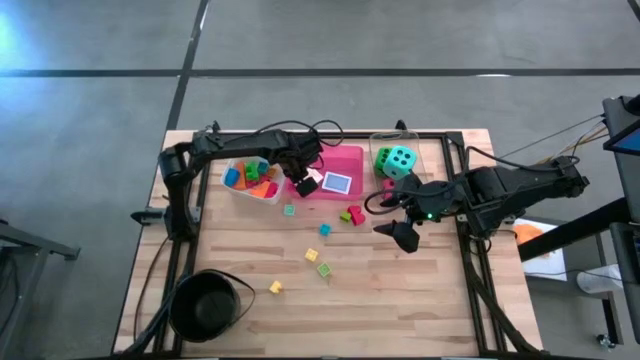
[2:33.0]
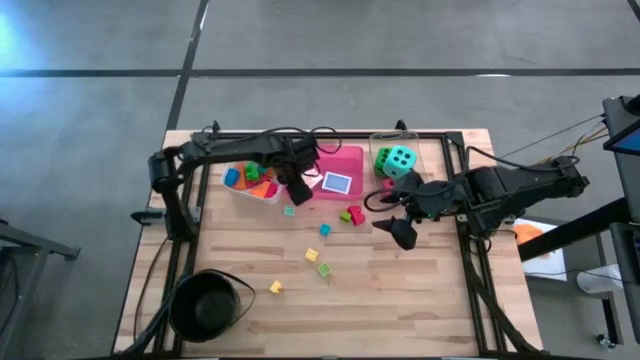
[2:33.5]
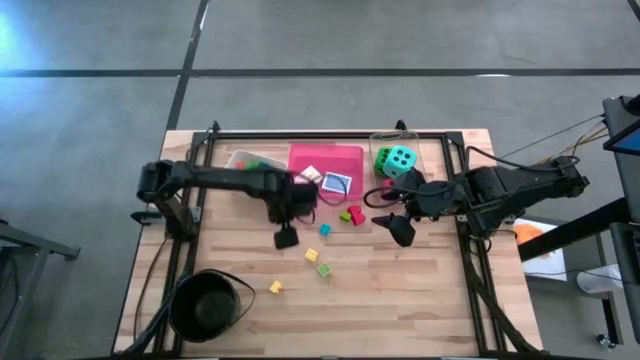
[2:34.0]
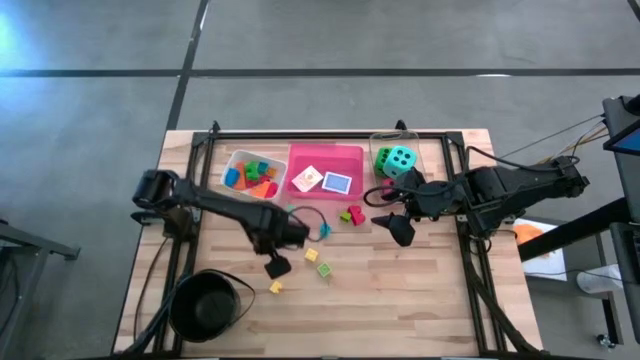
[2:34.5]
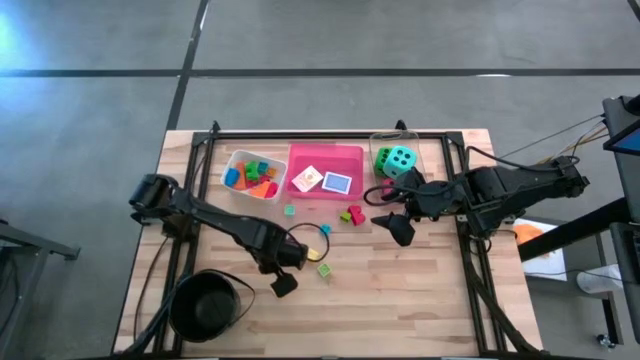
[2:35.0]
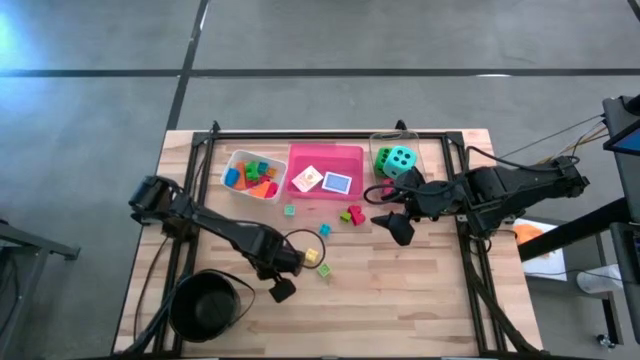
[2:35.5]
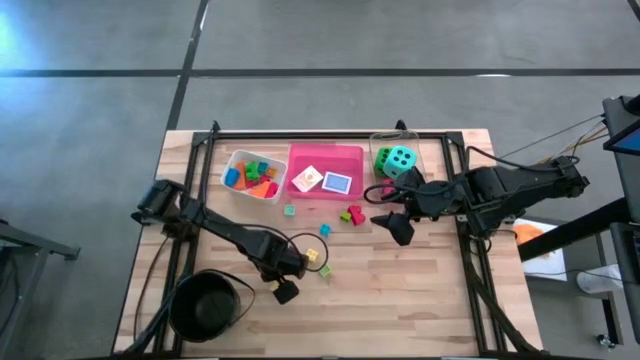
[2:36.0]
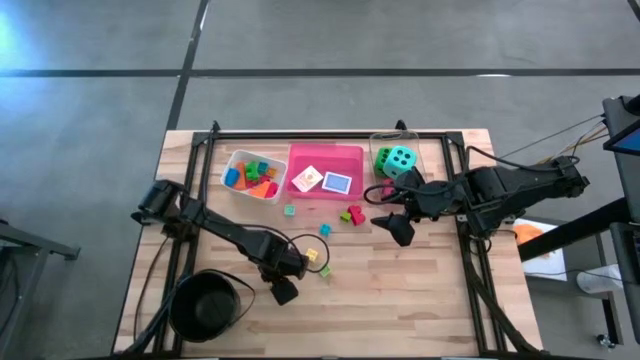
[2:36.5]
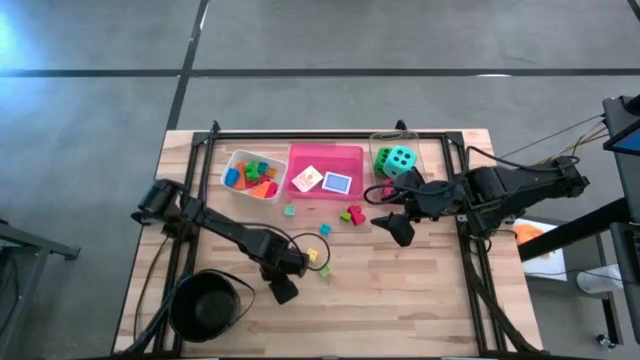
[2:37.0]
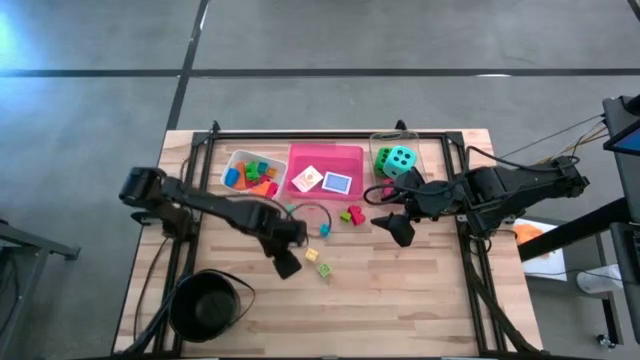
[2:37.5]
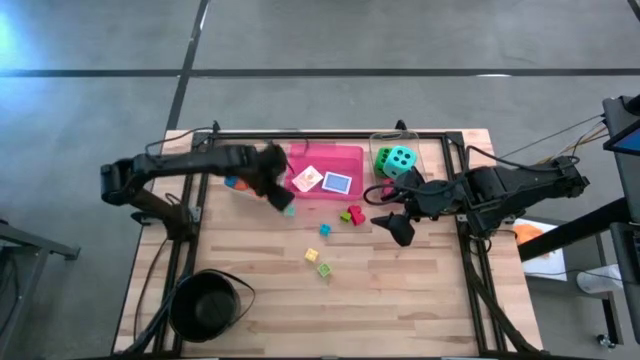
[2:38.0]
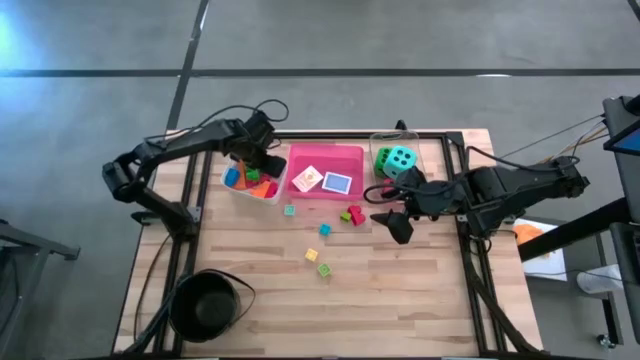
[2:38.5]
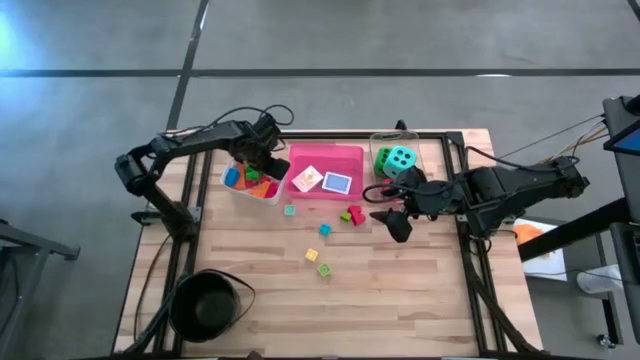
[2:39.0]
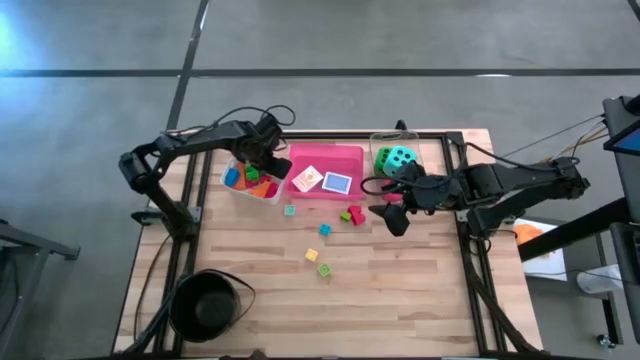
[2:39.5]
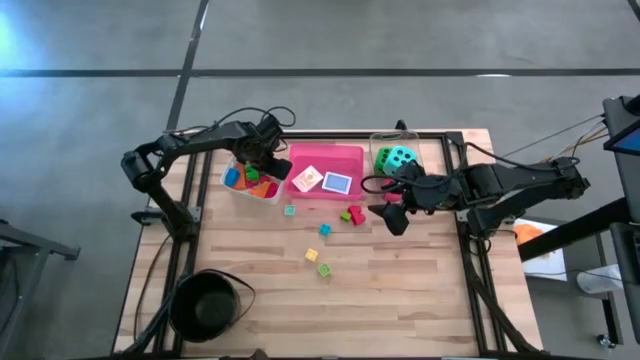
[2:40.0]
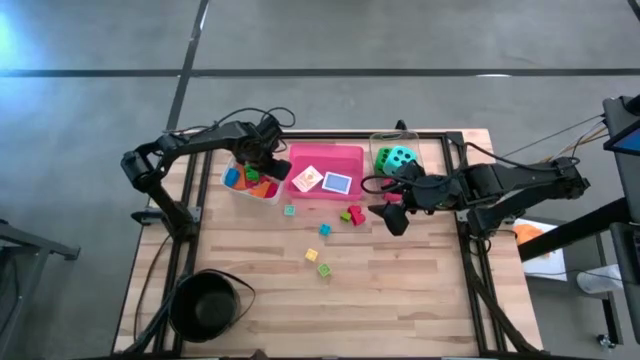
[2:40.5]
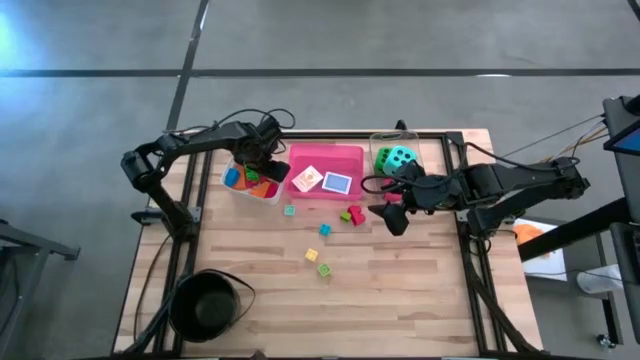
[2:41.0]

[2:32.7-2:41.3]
Task: Pick & Place Toys
Put the light yellow game piece into the white bin

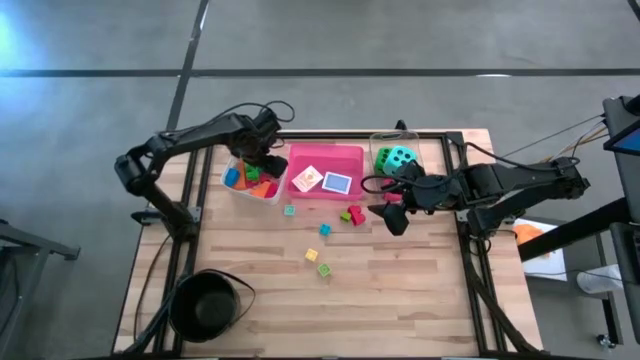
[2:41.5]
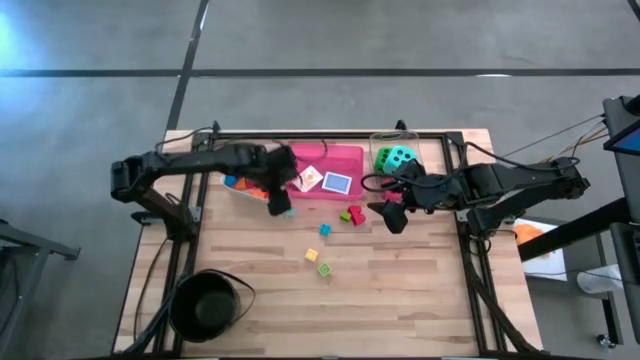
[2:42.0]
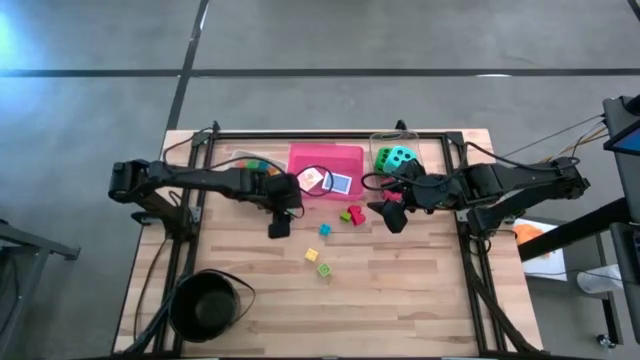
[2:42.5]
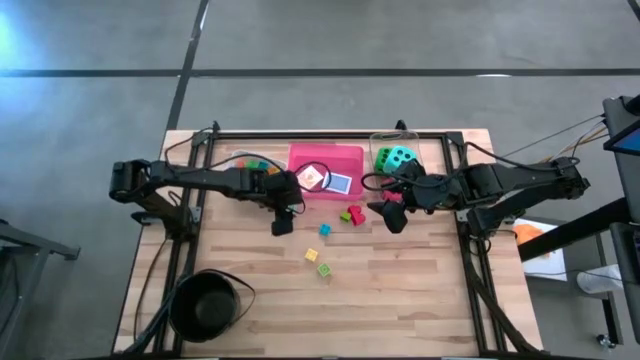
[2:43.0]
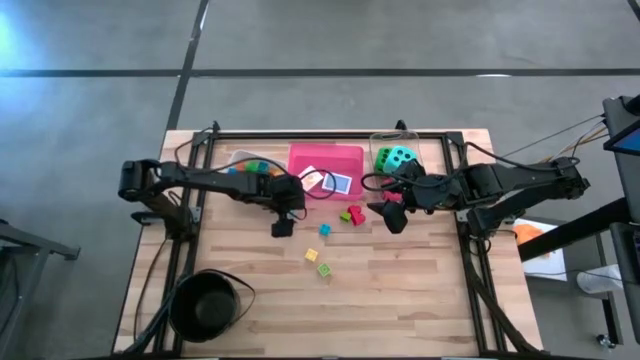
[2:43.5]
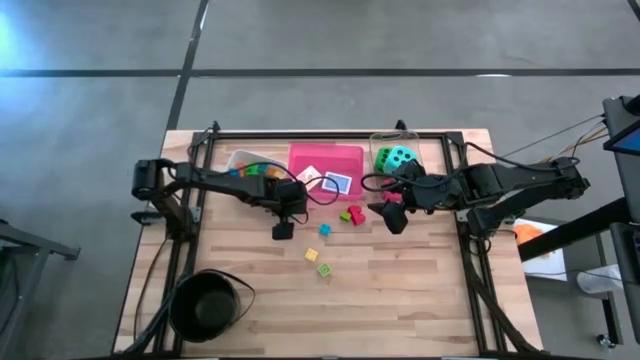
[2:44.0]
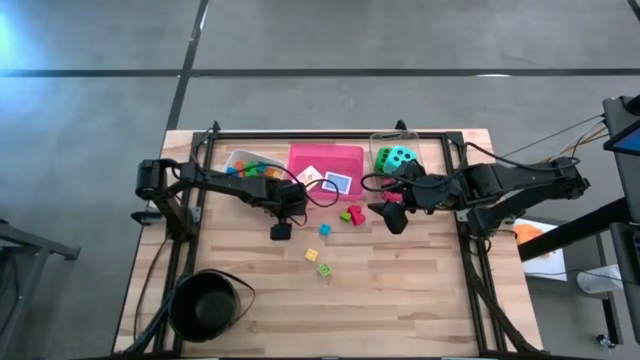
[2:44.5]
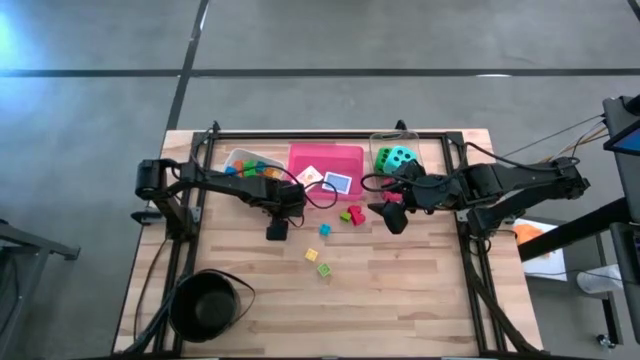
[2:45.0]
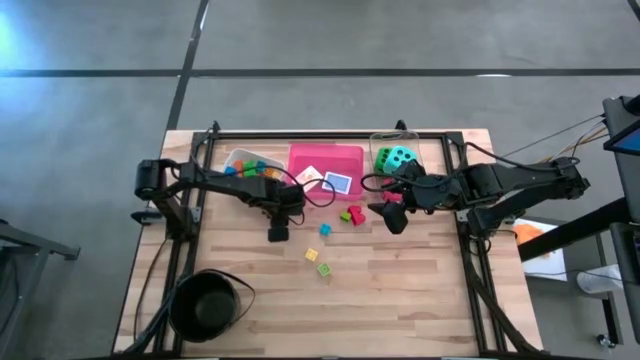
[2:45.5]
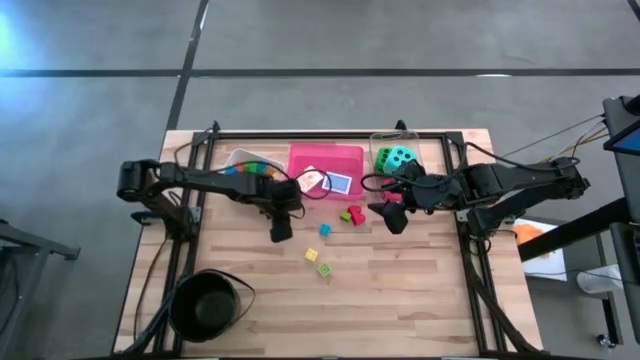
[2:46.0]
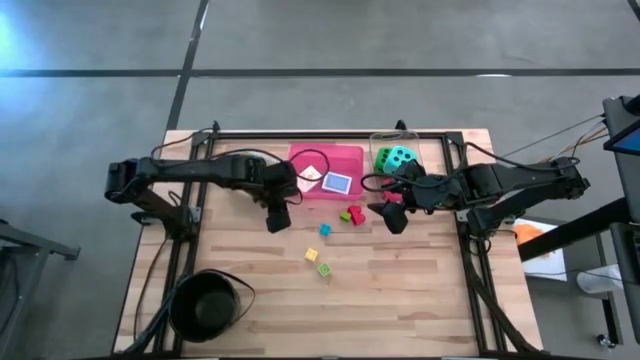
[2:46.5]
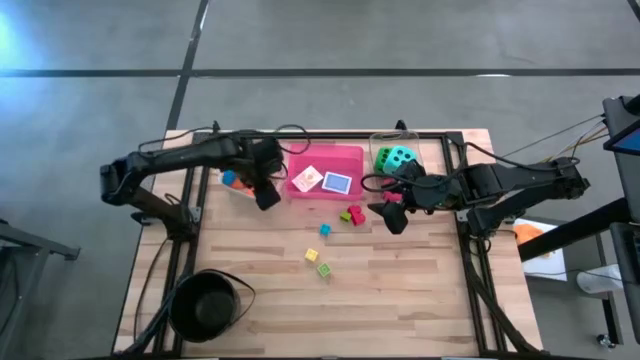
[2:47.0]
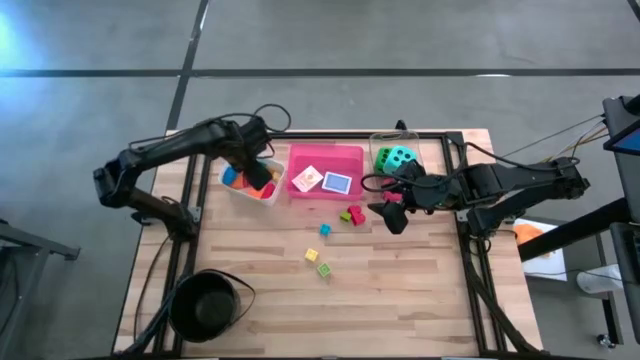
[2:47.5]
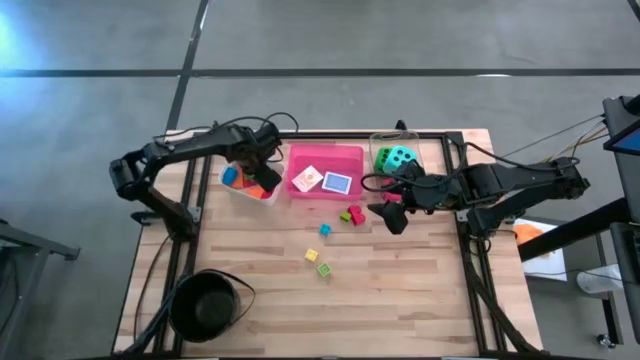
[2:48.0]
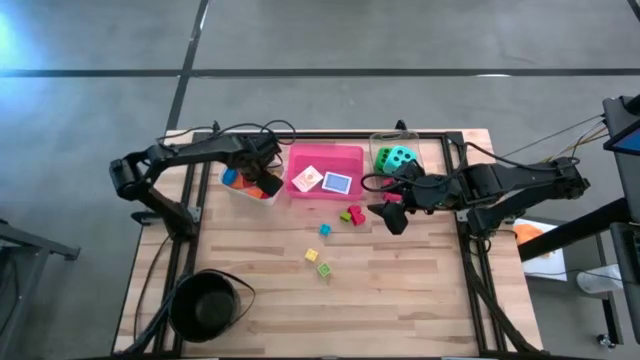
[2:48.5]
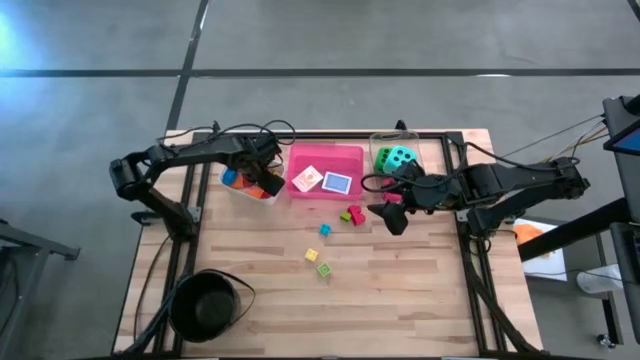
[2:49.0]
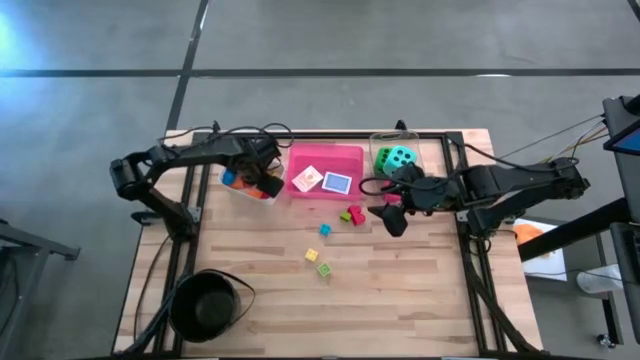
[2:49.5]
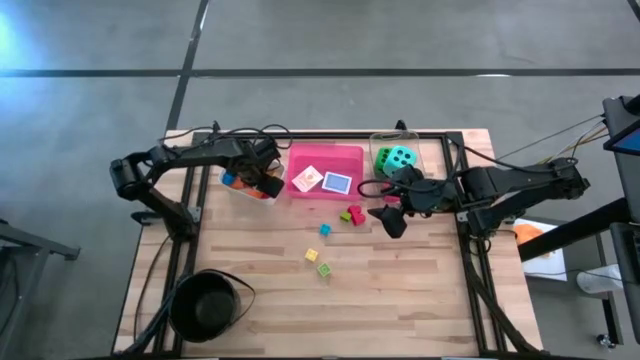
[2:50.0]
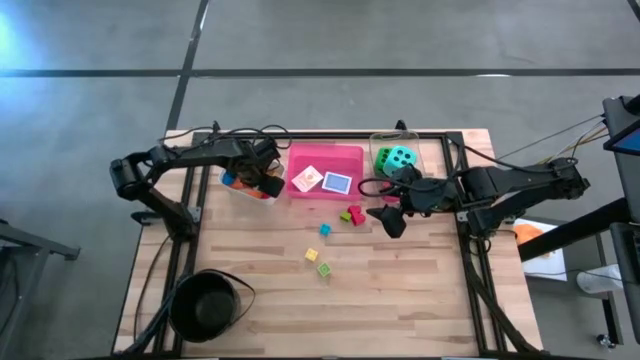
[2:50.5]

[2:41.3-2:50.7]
Put the light blue game piece into the white bin

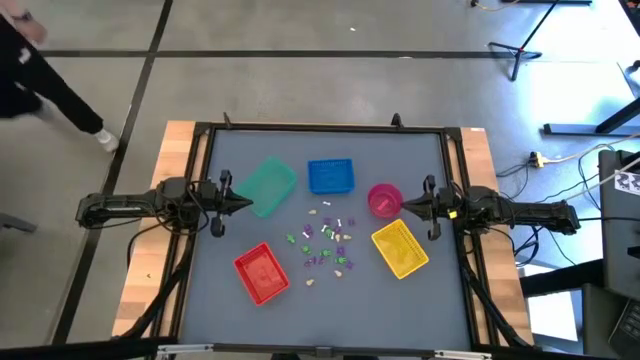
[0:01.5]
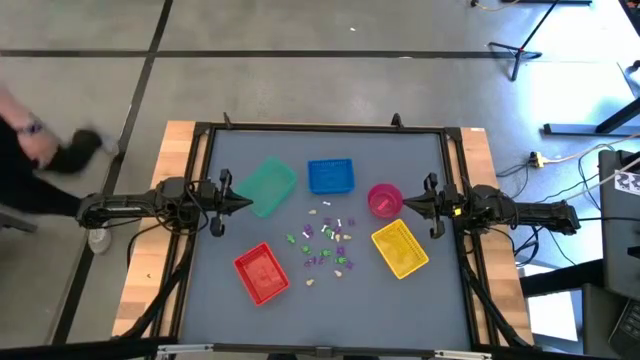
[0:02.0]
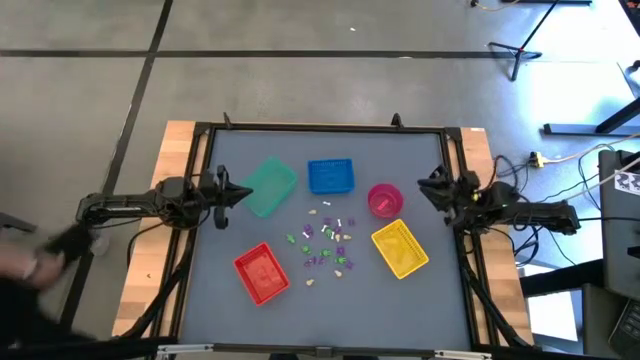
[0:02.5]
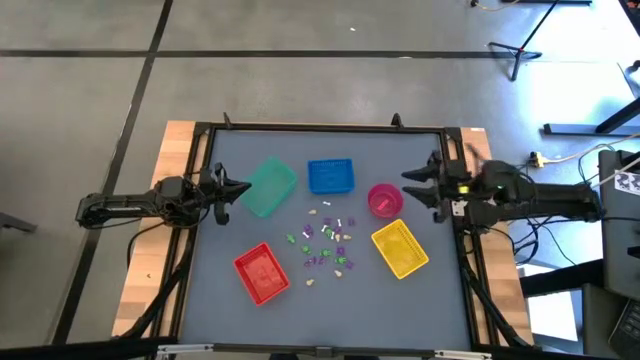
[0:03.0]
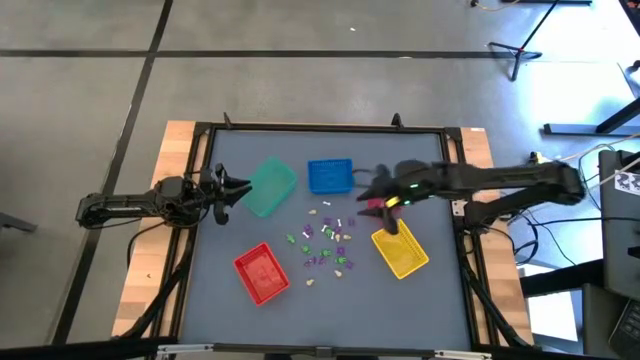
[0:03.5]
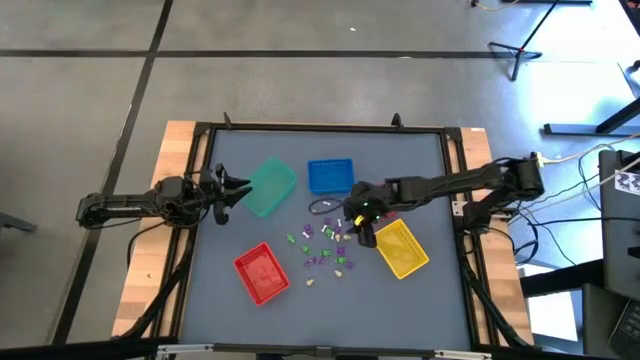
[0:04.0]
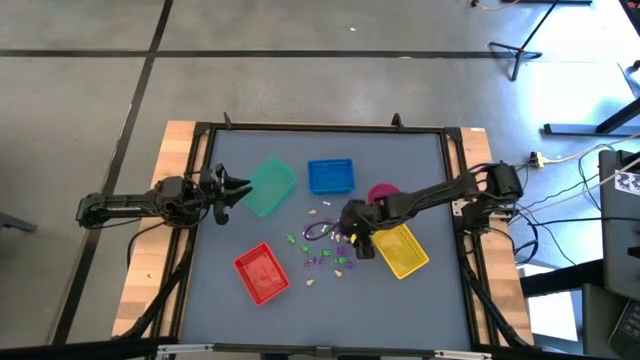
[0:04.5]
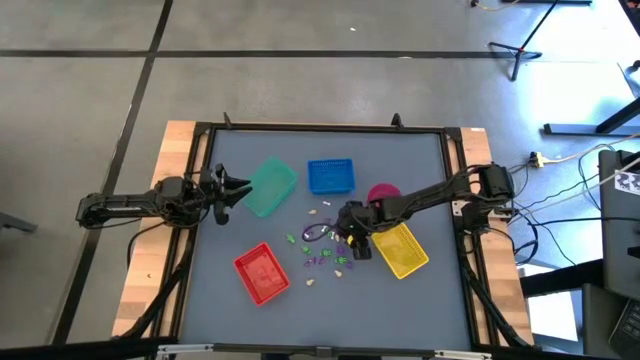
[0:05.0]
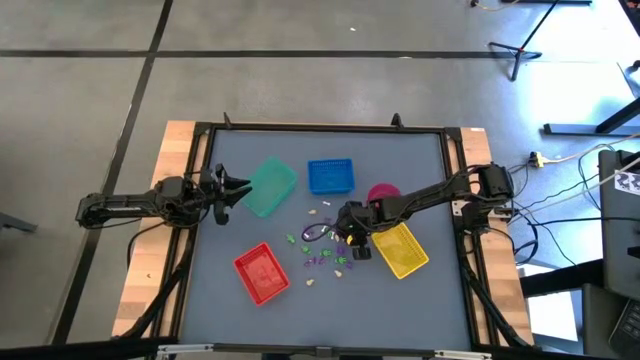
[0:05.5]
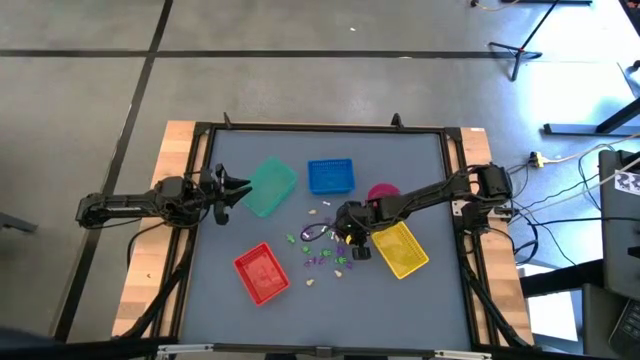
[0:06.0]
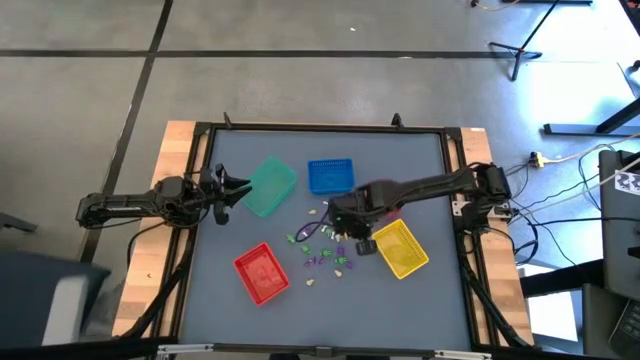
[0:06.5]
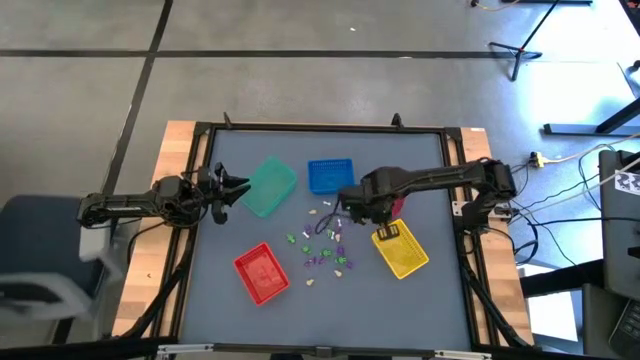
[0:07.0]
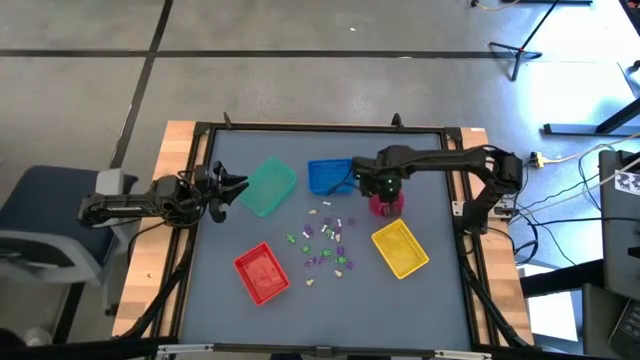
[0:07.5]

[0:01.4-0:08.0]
Task: Sort Halloween decoration
Put the yellow skull toy into the red bin
